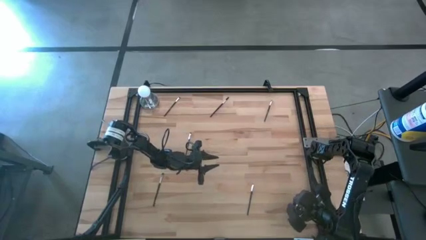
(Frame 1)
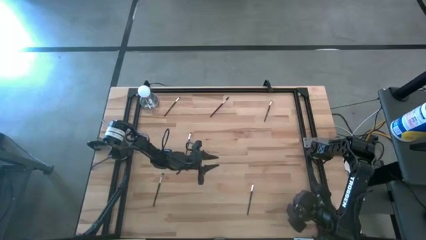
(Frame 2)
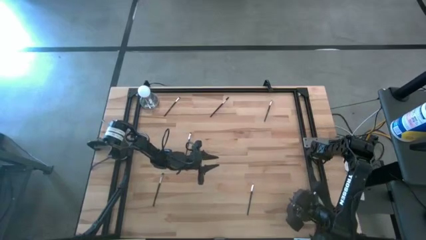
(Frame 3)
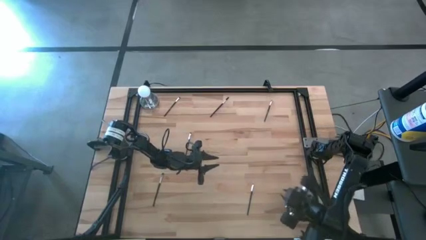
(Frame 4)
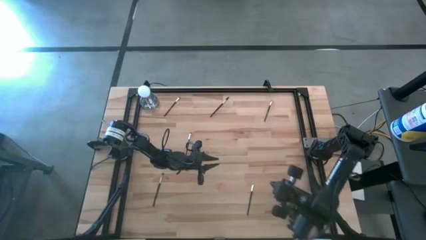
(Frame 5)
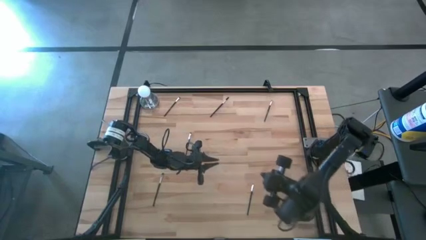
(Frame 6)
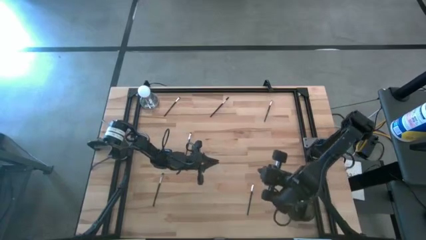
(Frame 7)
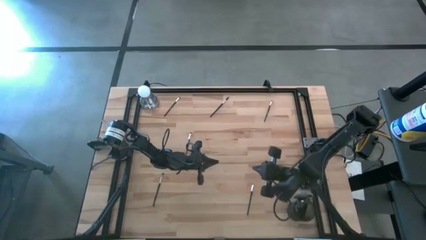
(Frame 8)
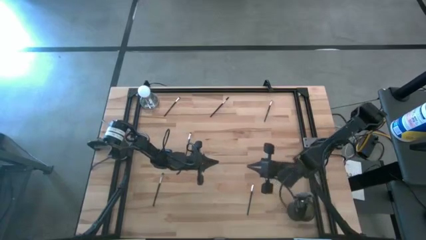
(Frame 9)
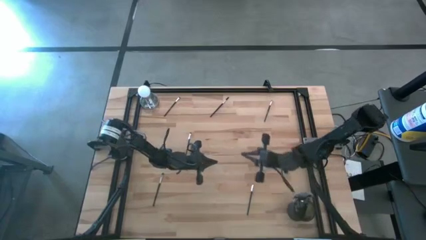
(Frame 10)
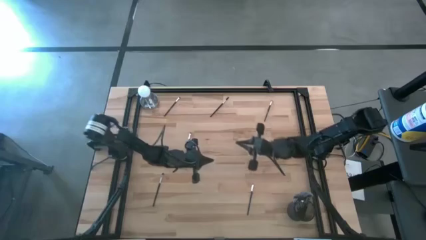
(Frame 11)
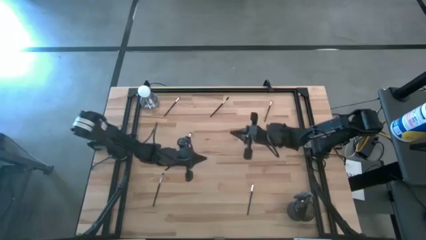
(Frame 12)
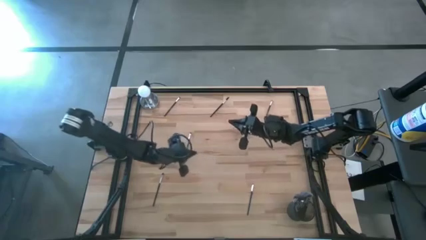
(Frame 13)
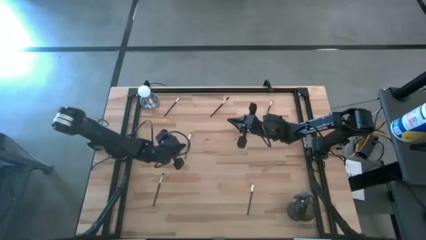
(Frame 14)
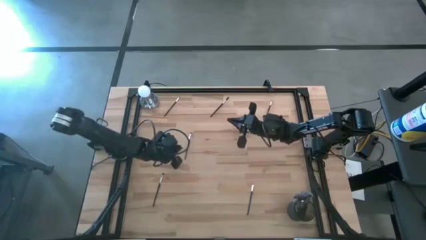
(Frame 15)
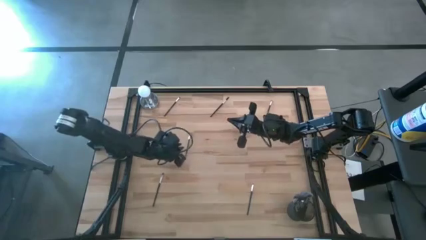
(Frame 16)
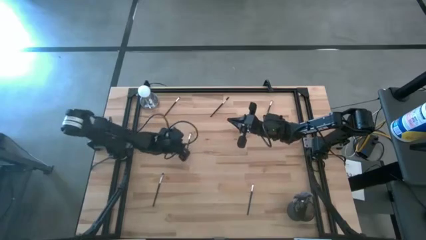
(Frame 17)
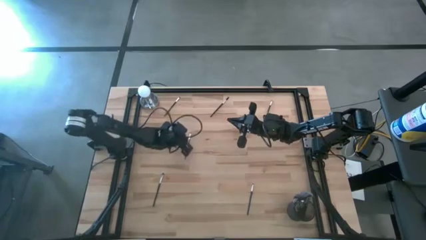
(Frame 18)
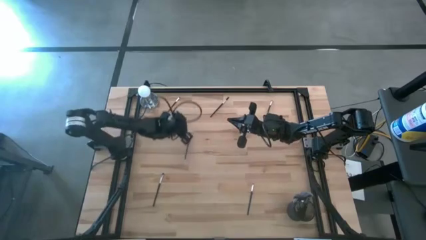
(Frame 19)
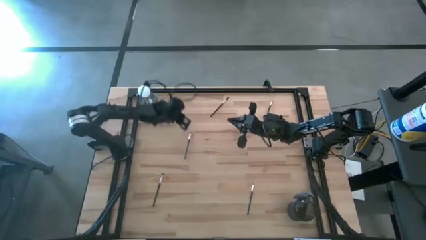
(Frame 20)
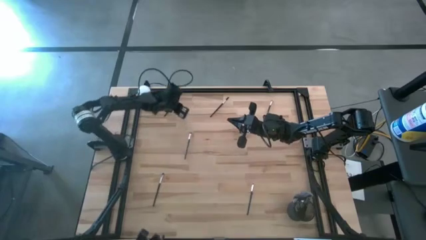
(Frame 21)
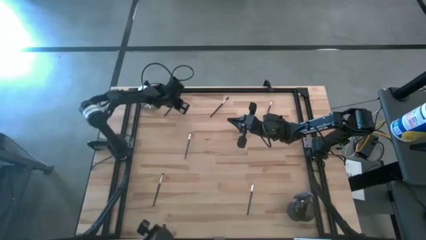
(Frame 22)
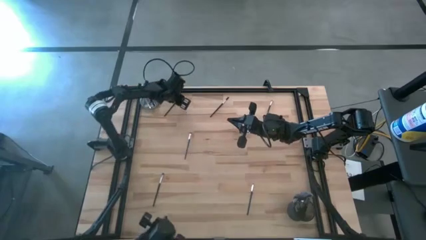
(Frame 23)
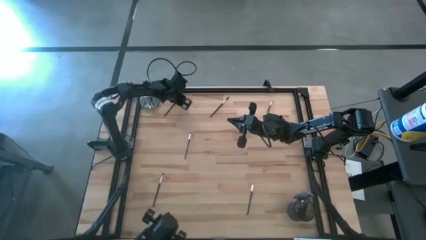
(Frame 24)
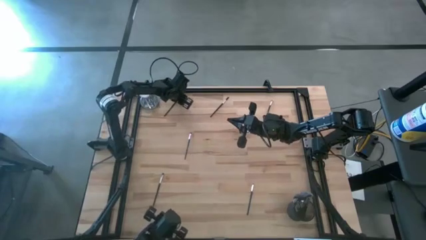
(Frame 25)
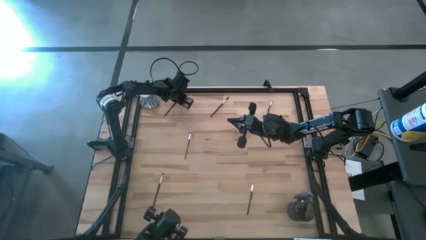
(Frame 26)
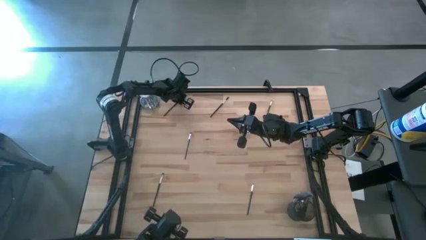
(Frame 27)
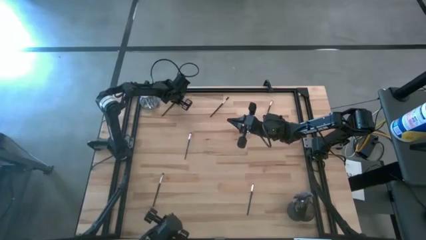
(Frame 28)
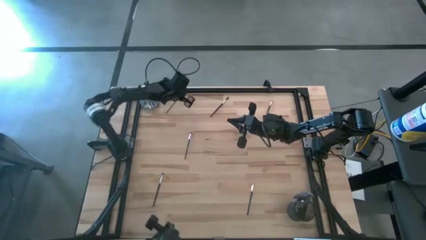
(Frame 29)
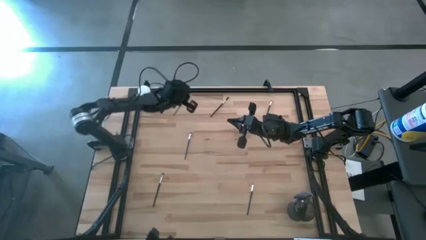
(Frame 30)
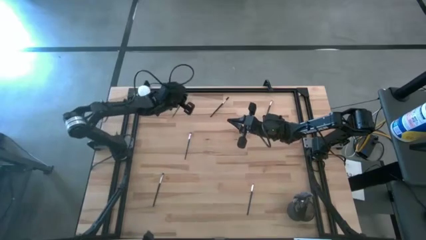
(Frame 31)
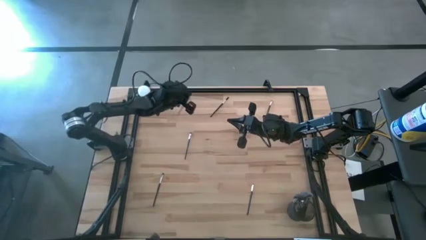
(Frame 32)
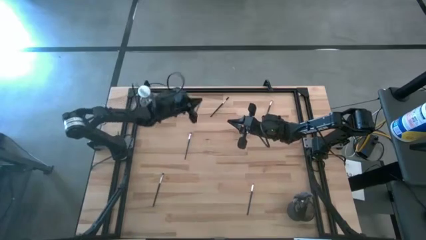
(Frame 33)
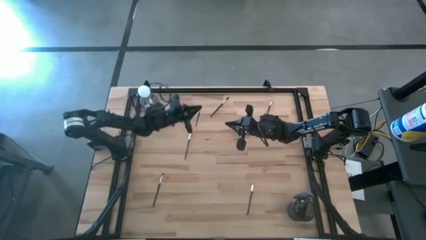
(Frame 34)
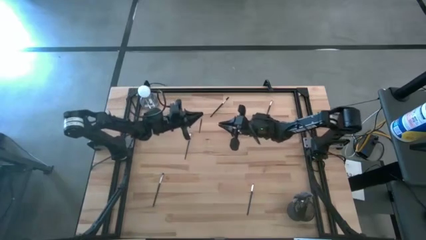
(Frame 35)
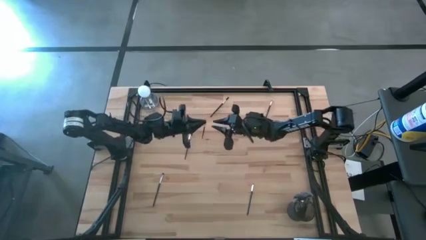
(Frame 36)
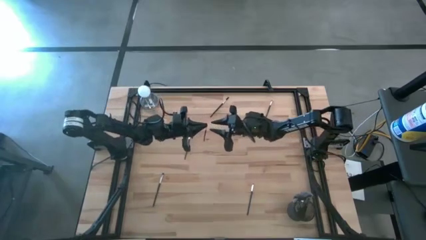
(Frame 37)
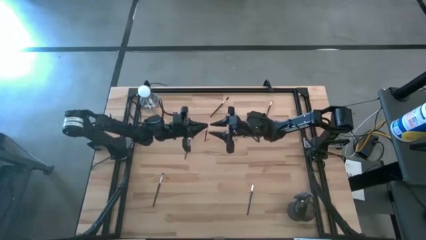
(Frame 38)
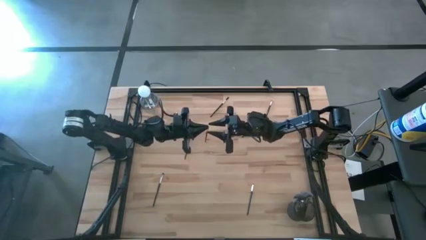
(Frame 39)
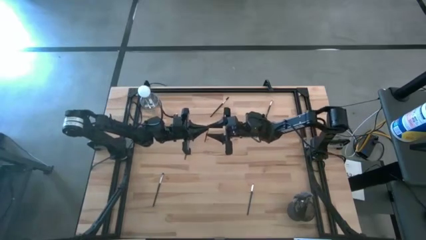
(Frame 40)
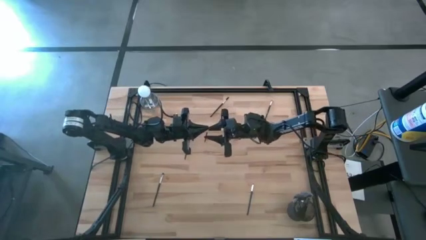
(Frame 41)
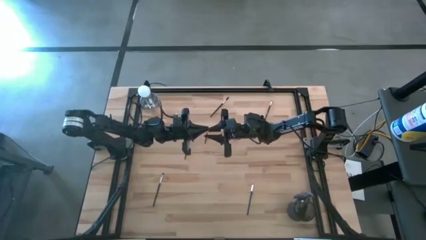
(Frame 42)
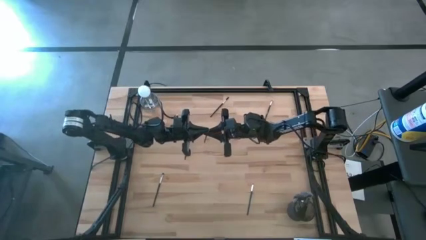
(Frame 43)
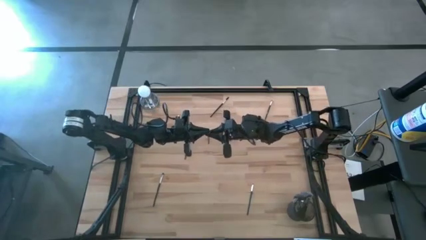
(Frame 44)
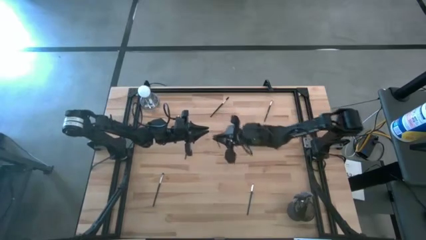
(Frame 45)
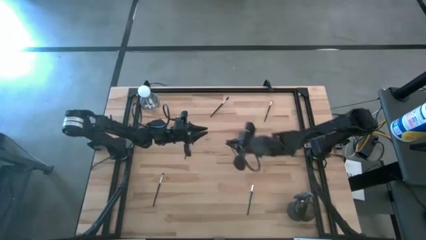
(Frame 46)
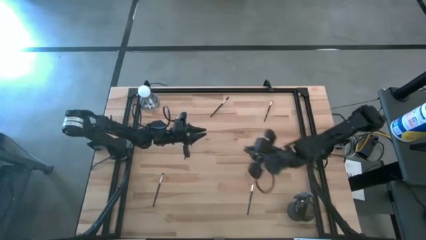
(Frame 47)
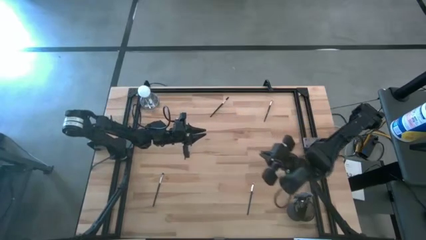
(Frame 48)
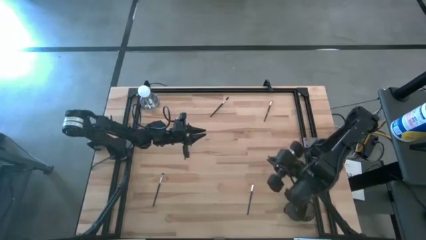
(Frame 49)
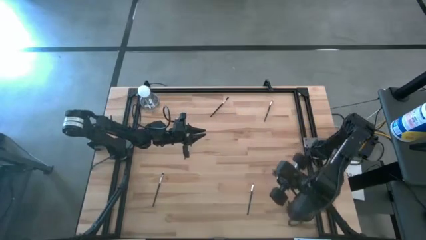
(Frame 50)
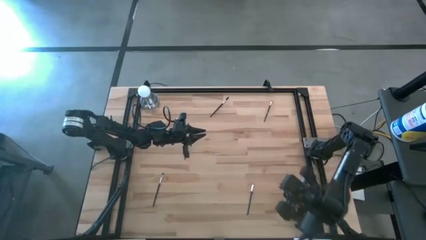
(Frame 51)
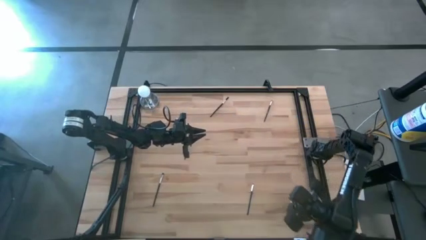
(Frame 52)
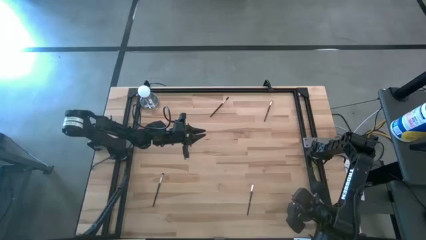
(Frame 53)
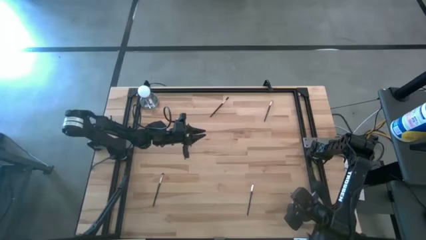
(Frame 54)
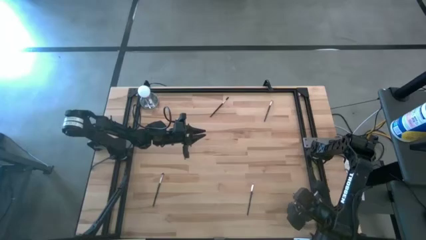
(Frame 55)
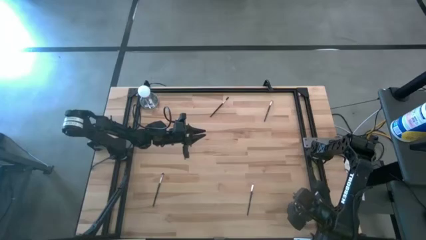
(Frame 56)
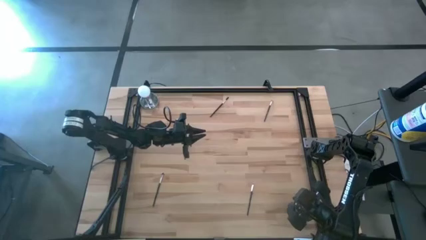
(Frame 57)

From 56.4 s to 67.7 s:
Task: Pick & Place Makeup Brushes
Put the black eyeshadow brush into the makeup holder
